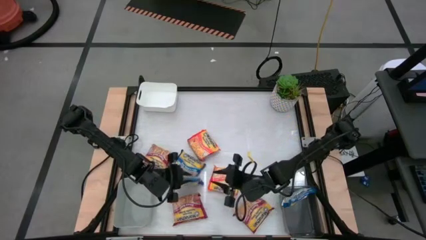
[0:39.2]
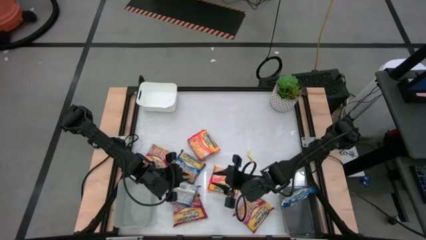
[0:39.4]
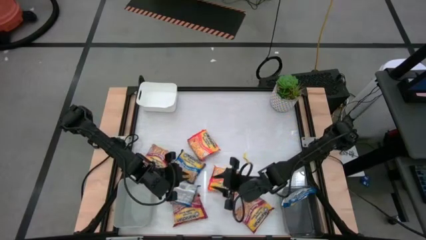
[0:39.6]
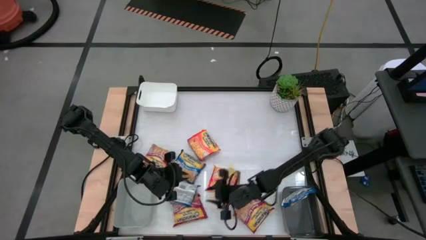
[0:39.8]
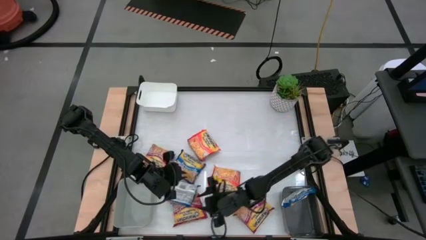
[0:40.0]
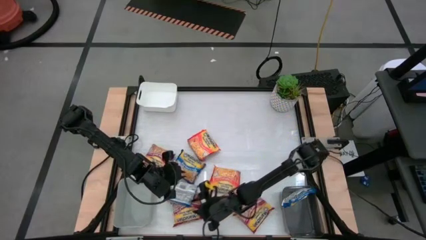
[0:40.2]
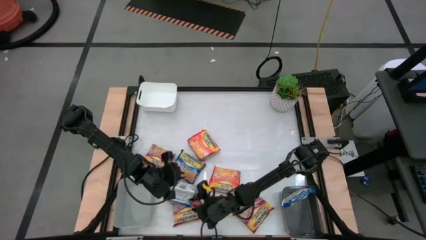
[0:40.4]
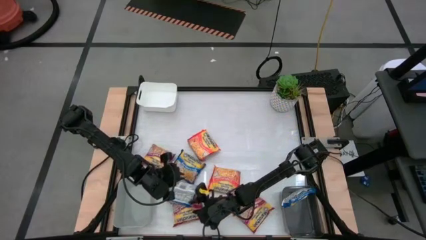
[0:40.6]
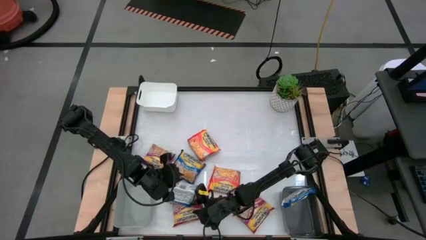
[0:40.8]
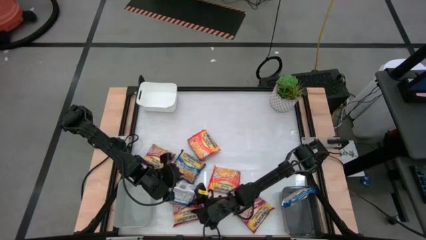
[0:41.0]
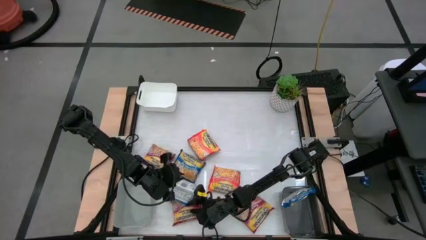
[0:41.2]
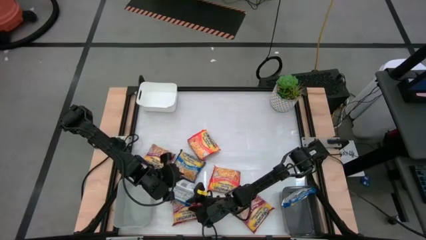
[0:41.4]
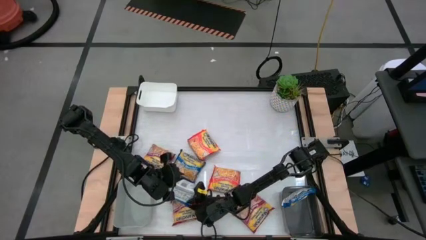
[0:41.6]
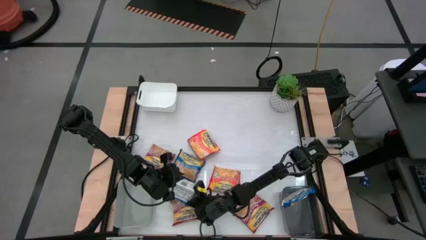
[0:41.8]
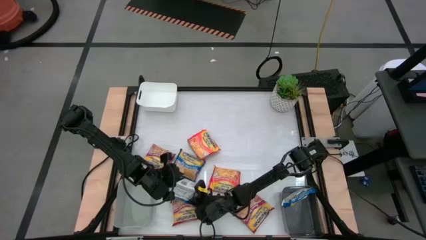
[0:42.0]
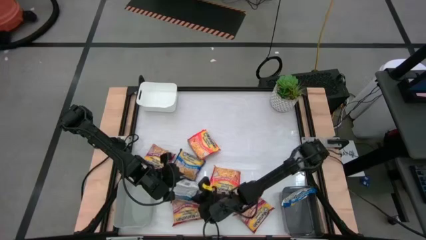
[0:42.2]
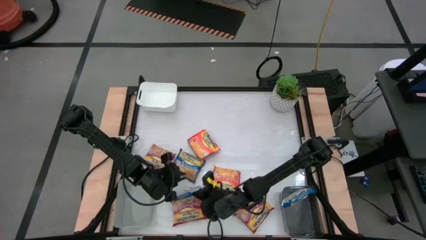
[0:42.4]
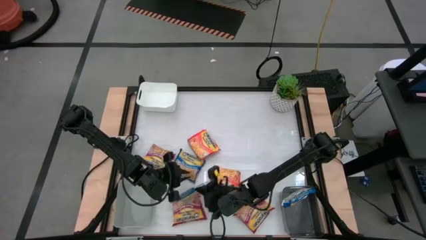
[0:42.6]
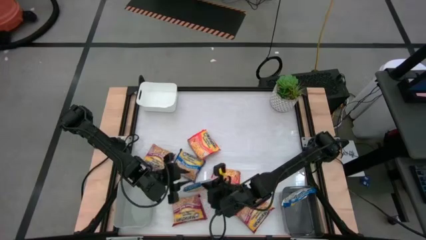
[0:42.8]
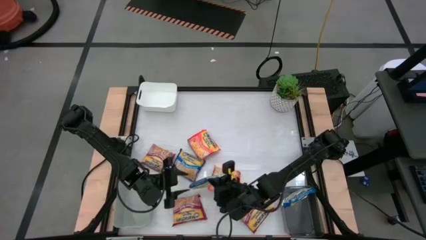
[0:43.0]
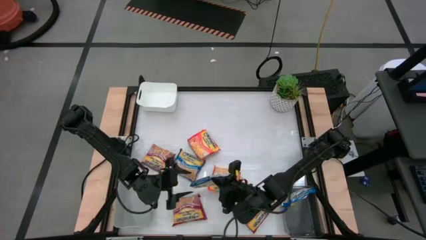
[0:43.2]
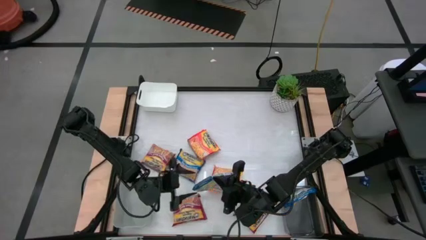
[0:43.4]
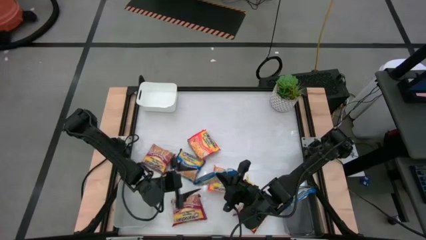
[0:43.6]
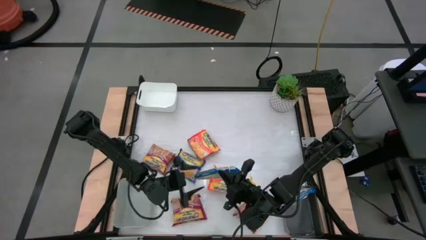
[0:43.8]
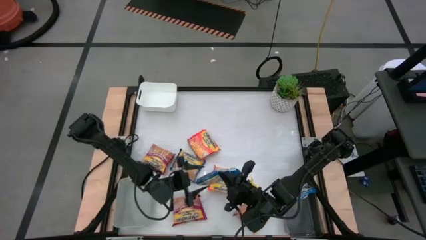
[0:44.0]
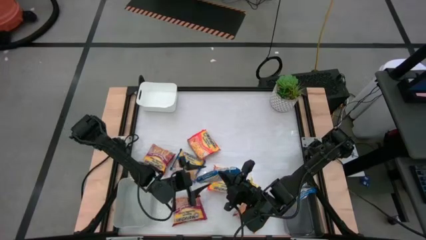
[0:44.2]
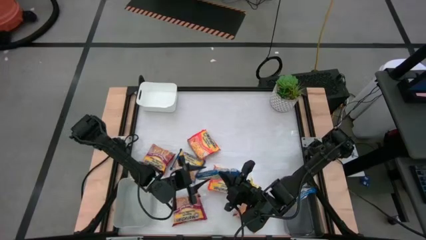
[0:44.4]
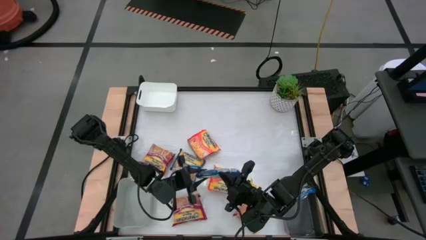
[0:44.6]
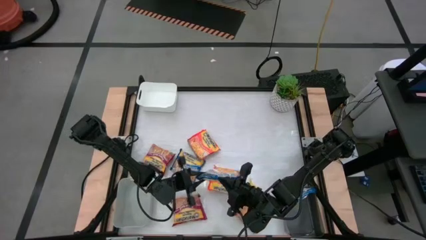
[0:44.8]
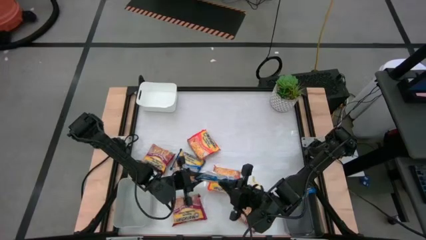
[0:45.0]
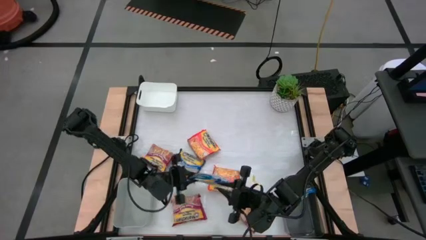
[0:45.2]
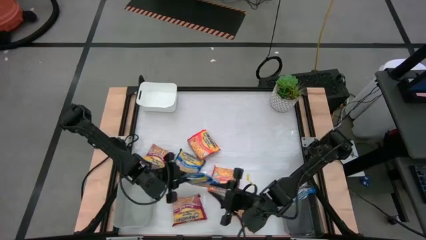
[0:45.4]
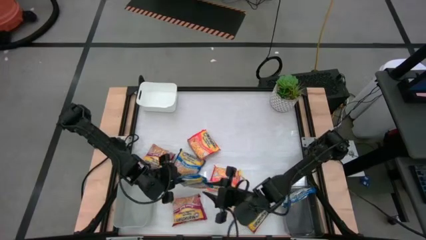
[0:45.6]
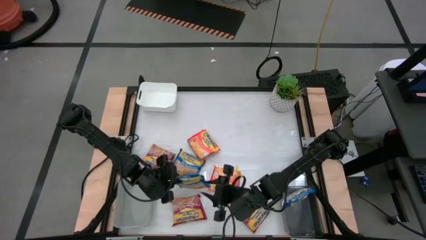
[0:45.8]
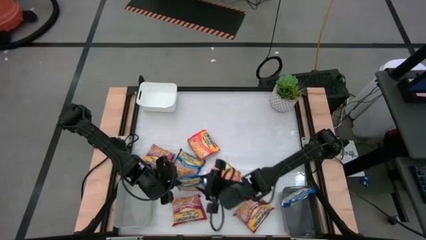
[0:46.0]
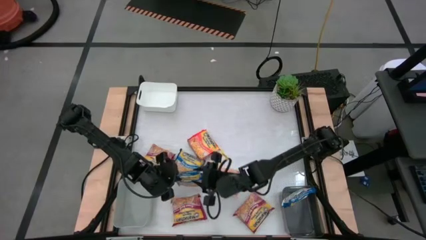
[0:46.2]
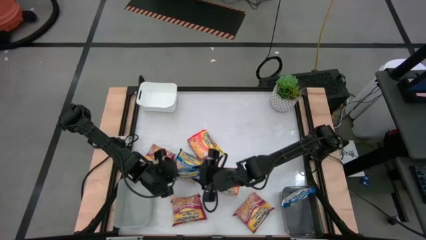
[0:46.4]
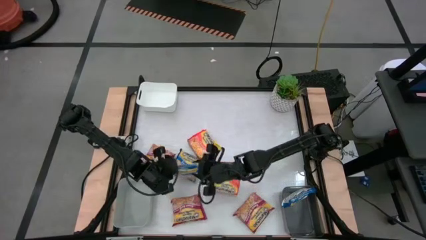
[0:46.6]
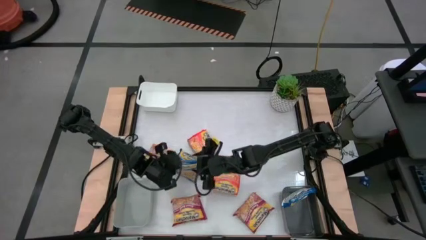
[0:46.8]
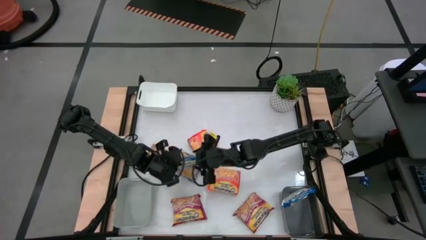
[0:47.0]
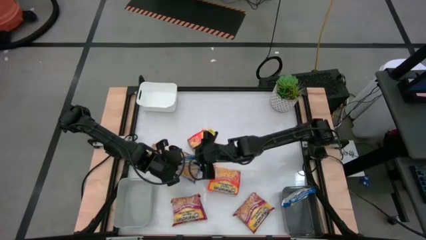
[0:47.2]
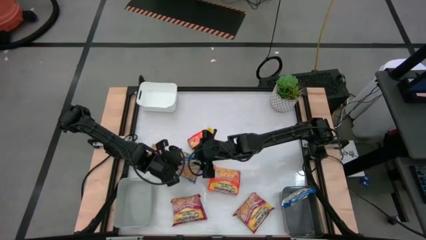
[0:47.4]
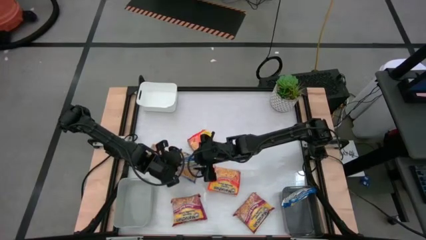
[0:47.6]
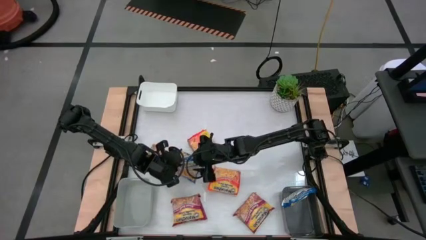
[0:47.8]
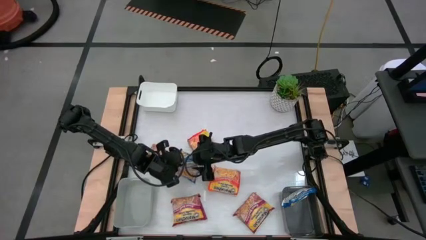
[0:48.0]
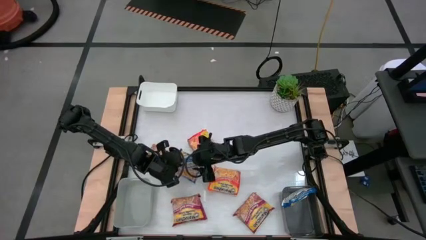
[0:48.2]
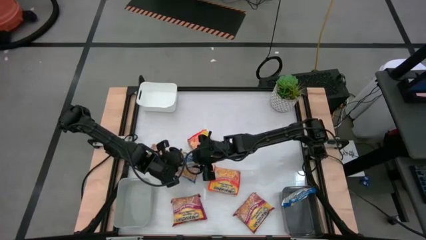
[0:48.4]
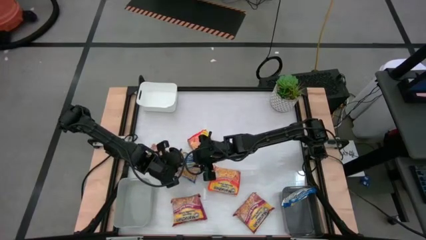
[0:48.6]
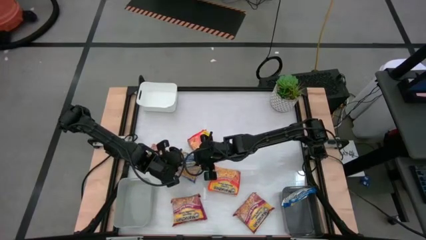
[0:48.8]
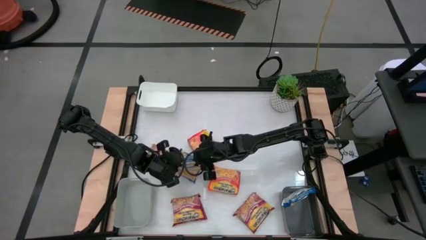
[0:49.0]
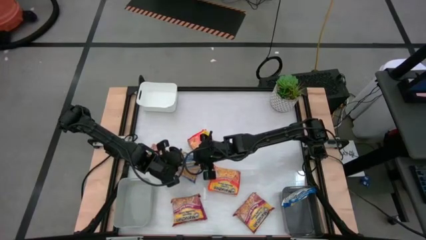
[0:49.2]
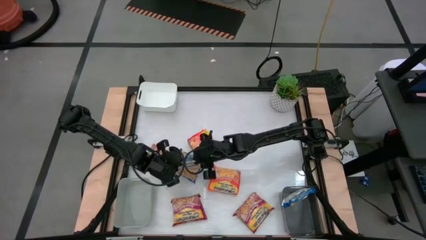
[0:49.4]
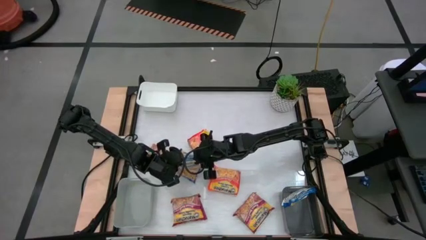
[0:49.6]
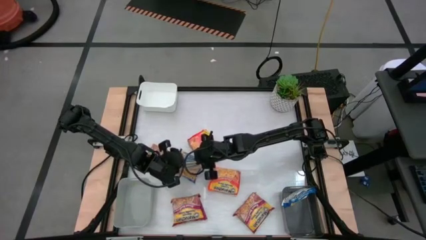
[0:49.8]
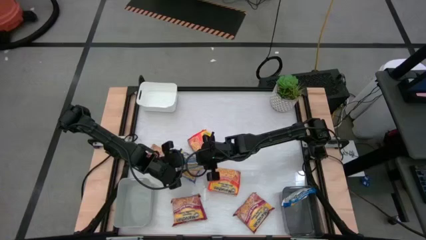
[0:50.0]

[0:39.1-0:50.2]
Task: Sort Maruchan noodles
Put the top blue noodle pack into the black bin

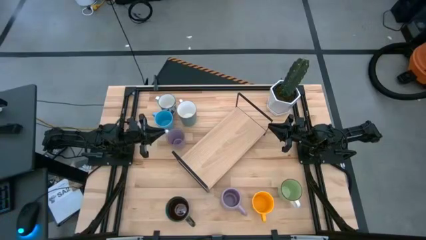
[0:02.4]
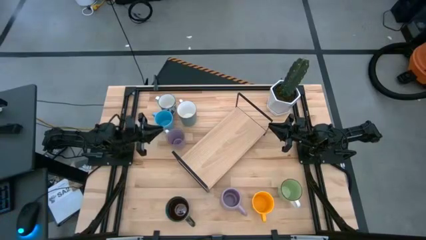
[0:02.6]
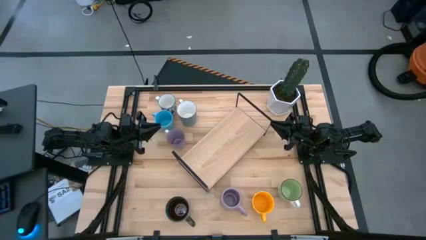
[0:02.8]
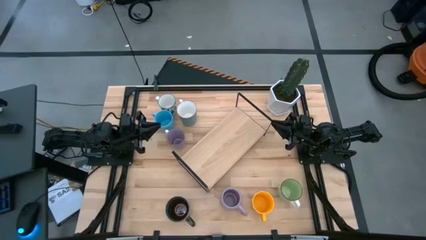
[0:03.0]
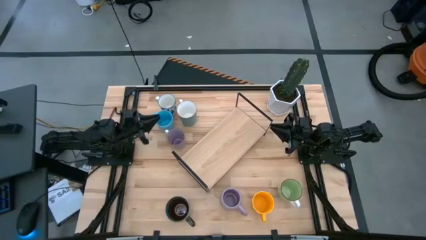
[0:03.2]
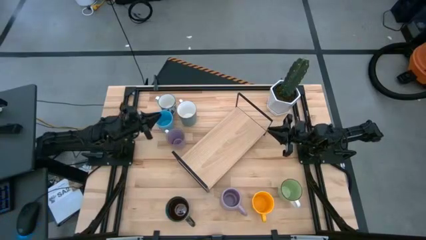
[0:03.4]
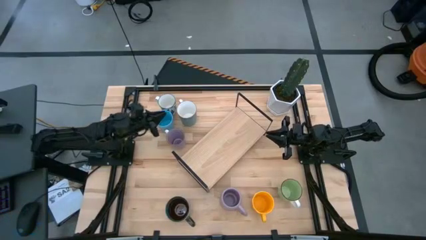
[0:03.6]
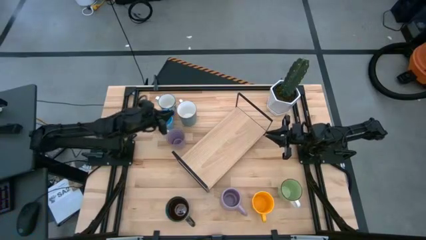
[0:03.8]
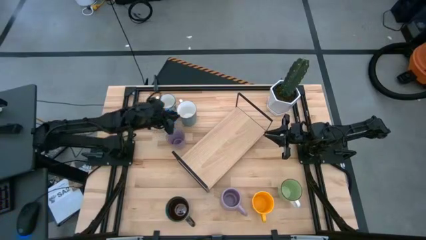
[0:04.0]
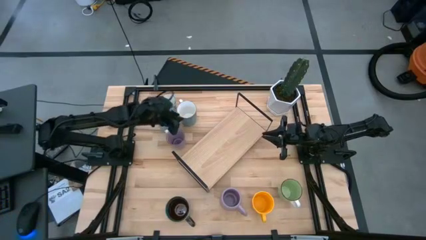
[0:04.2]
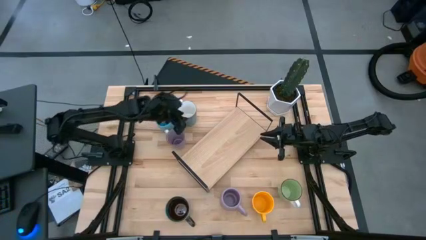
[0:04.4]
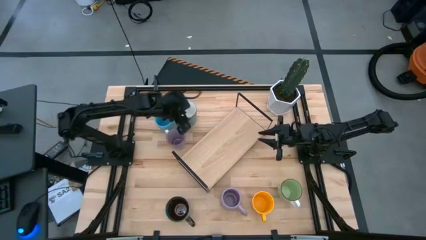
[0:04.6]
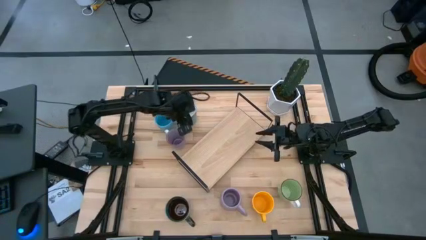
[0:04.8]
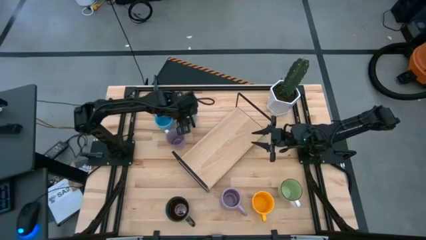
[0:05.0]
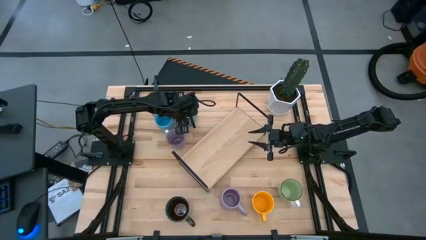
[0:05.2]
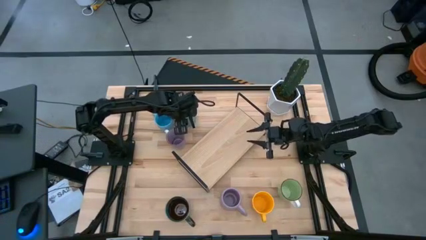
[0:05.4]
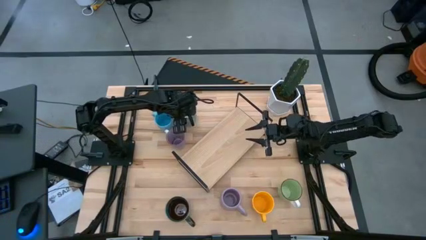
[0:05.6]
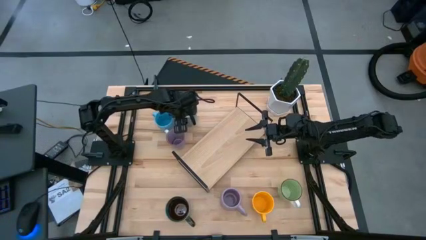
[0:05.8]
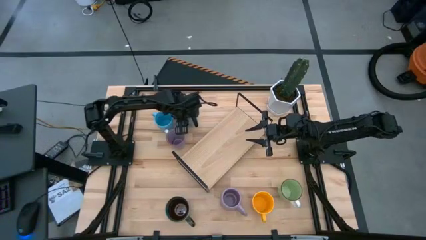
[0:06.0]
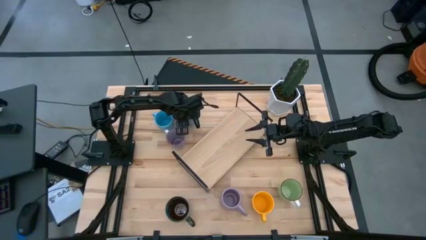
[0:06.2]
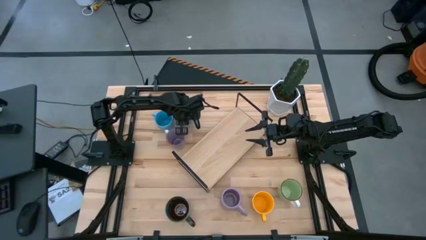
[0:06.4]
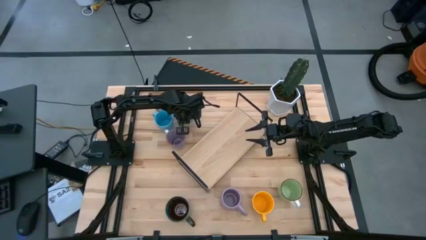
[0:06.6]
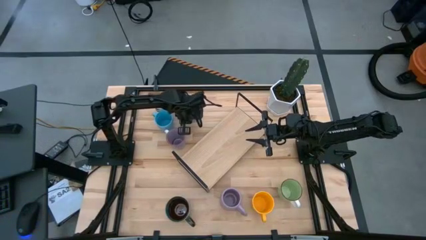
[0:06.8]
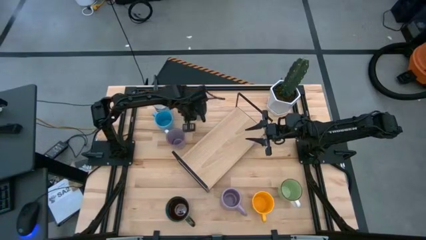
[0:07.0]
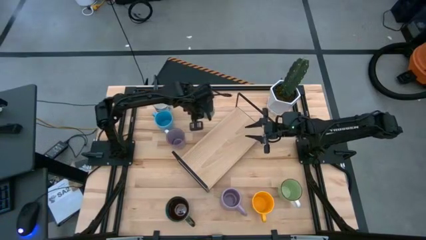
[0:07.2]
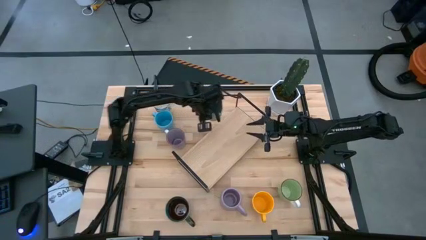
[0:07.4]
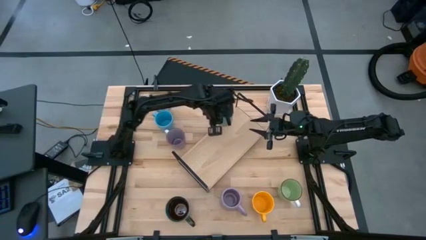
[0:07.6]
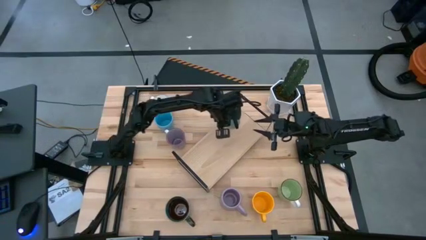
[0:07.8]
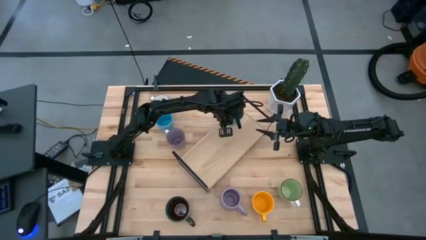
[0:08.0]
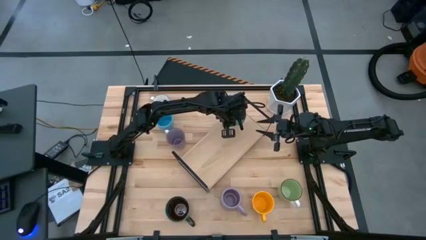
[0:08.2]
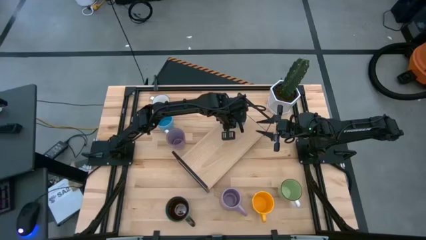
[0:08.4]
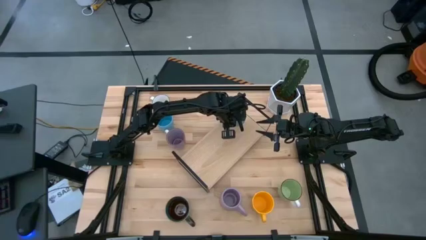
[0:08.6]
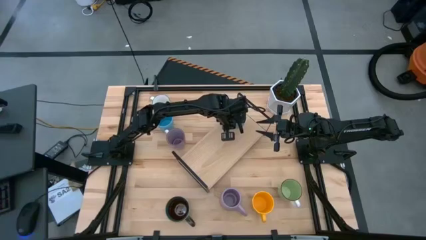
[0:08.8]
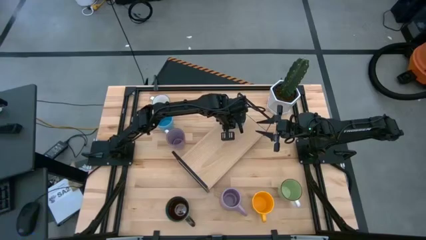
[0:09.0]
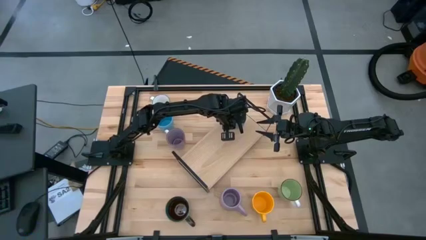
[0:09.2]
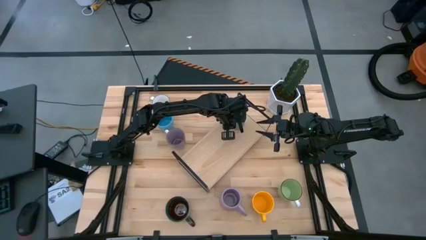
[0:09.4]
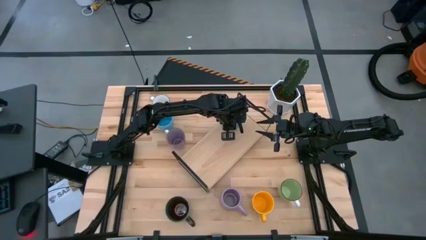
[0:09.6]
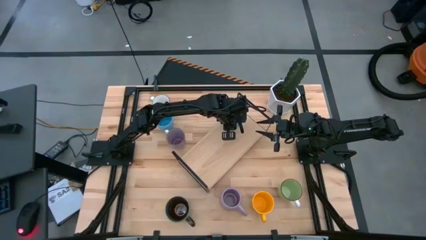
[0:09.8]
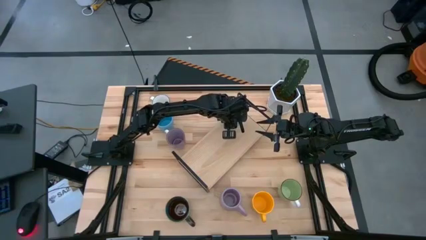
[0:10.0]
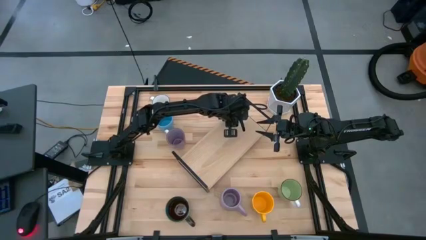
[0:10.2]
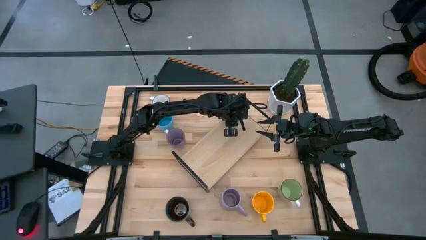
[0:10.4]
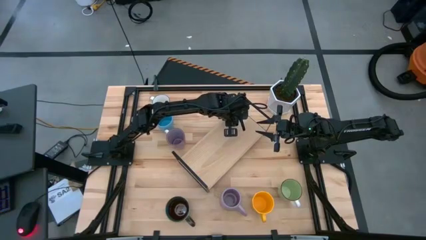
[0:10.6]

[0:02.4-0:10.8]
Task: Place coffee mugs
Put the middle green mug on the shelf
